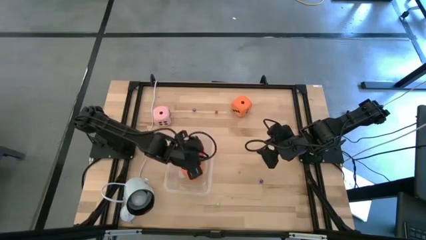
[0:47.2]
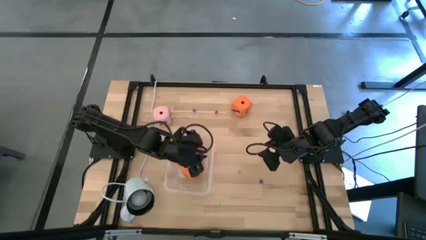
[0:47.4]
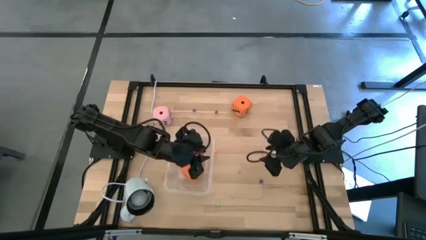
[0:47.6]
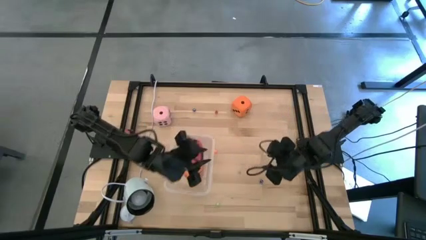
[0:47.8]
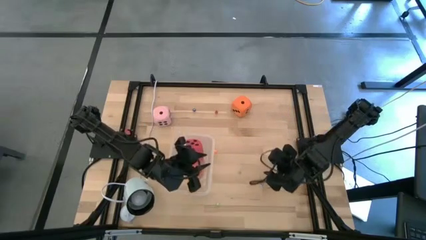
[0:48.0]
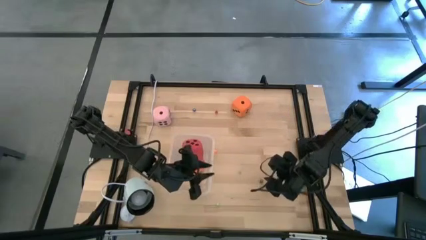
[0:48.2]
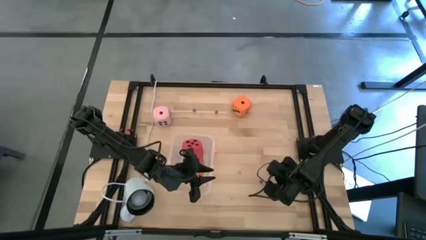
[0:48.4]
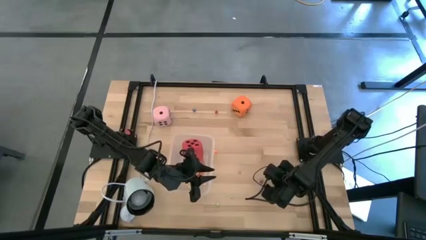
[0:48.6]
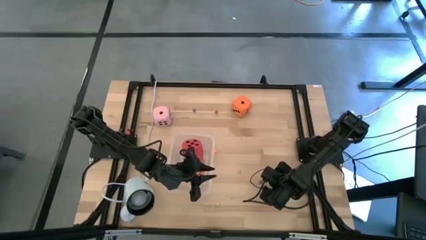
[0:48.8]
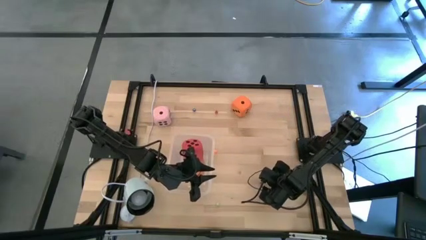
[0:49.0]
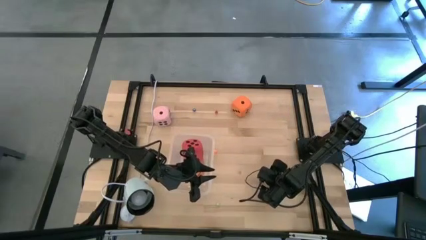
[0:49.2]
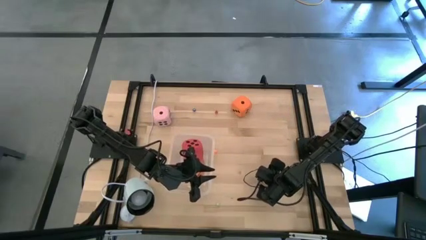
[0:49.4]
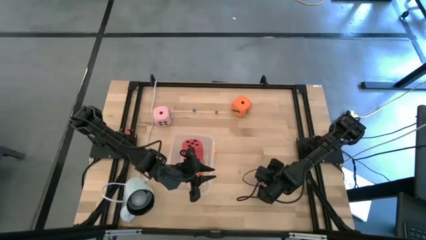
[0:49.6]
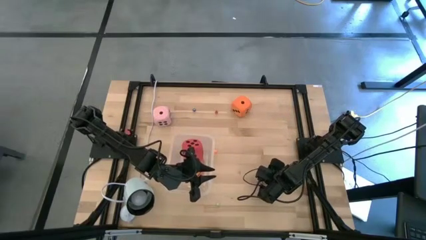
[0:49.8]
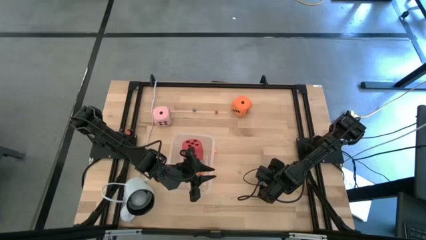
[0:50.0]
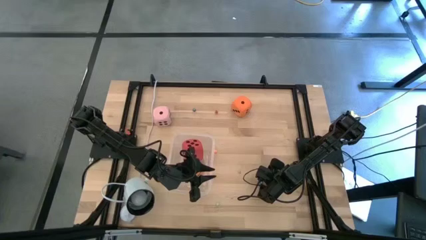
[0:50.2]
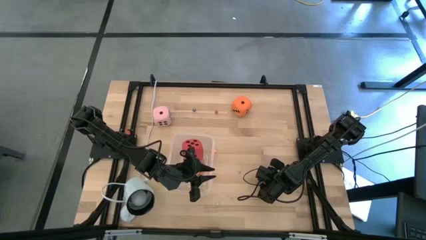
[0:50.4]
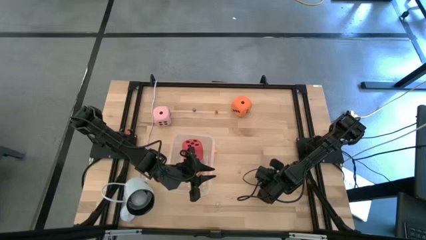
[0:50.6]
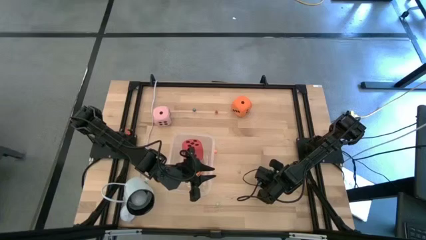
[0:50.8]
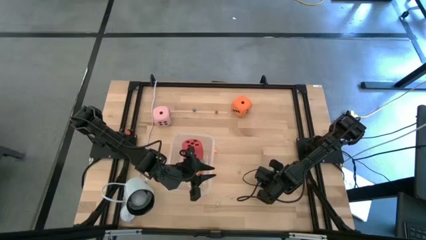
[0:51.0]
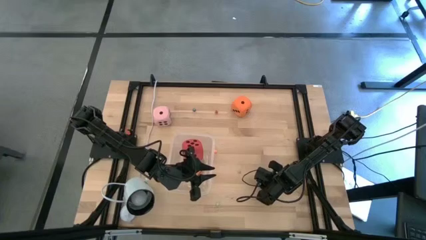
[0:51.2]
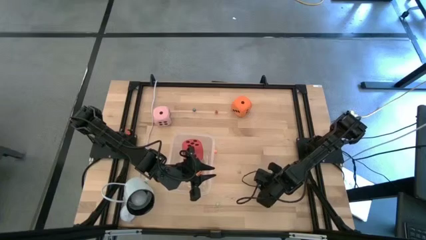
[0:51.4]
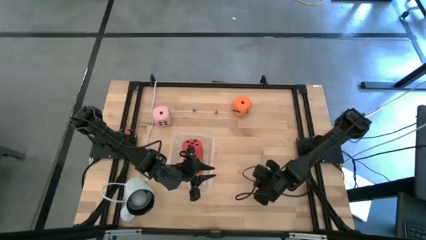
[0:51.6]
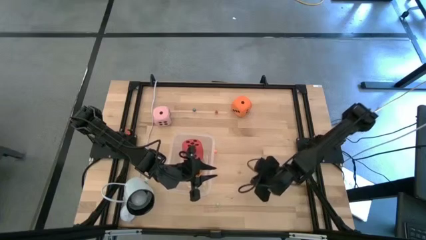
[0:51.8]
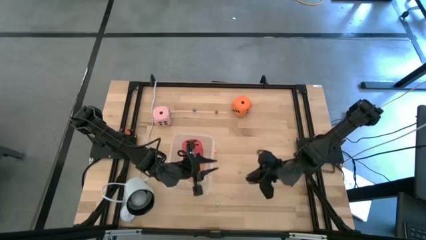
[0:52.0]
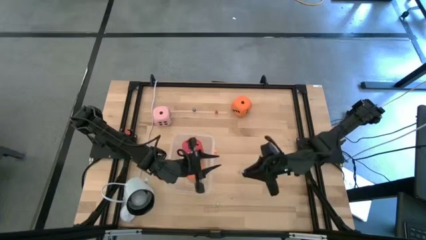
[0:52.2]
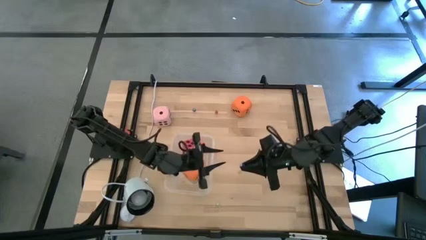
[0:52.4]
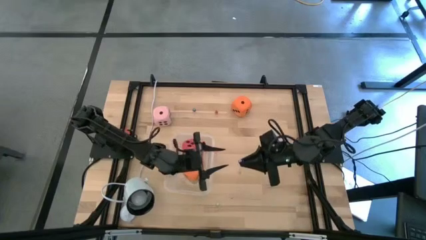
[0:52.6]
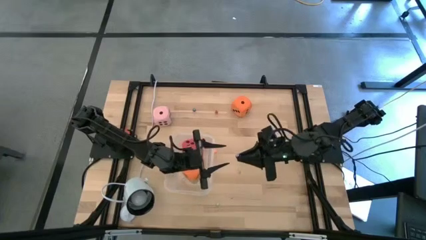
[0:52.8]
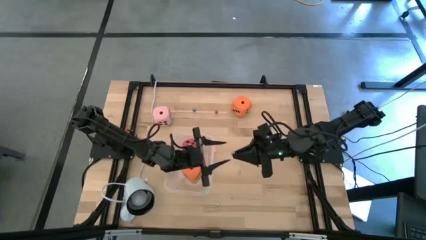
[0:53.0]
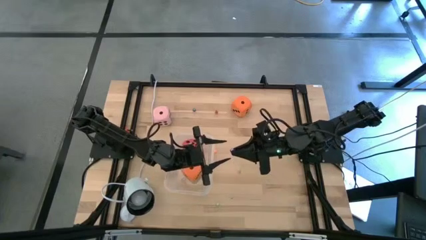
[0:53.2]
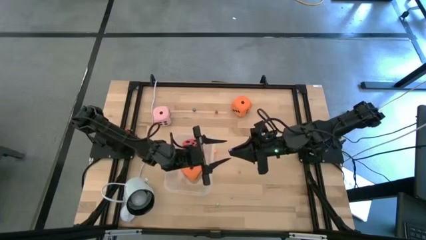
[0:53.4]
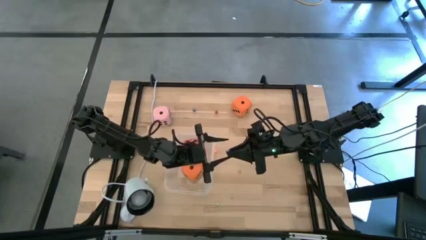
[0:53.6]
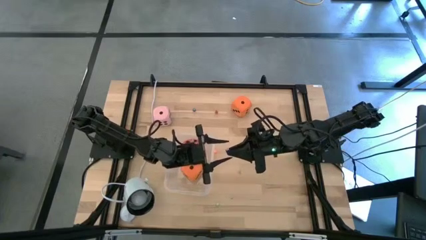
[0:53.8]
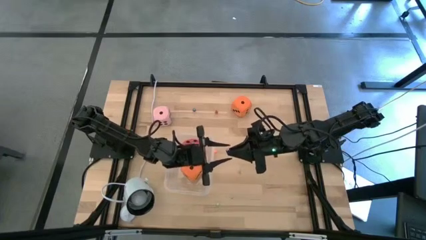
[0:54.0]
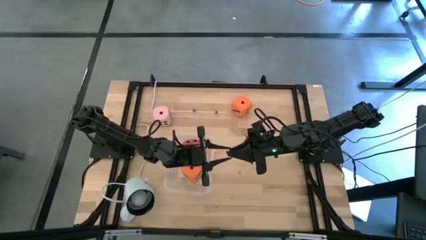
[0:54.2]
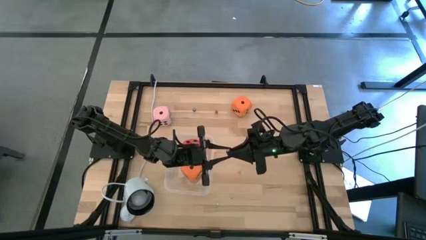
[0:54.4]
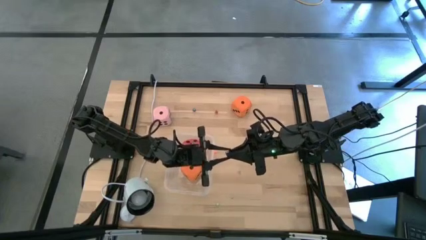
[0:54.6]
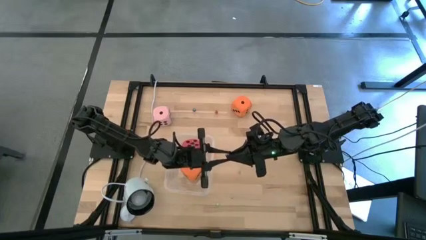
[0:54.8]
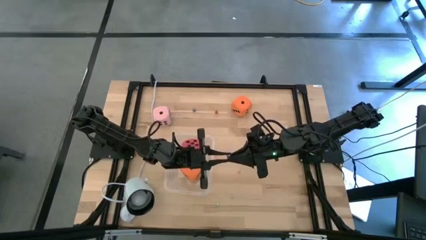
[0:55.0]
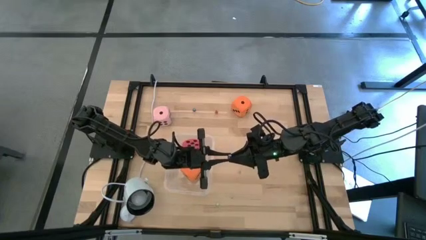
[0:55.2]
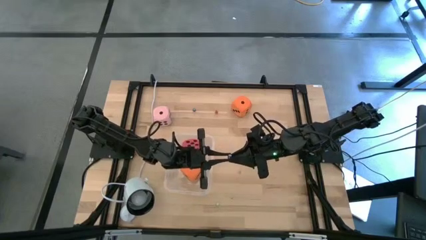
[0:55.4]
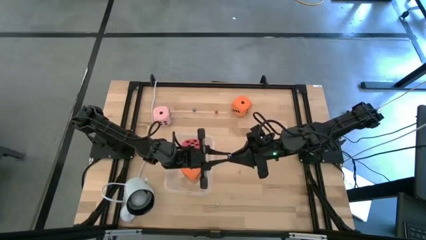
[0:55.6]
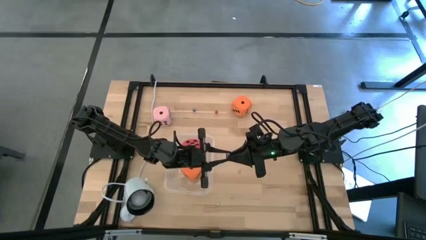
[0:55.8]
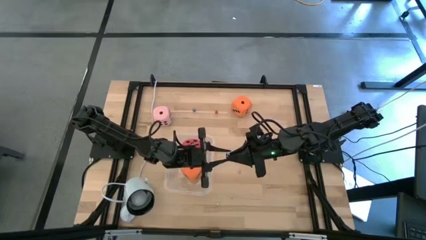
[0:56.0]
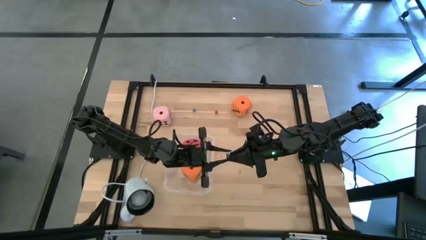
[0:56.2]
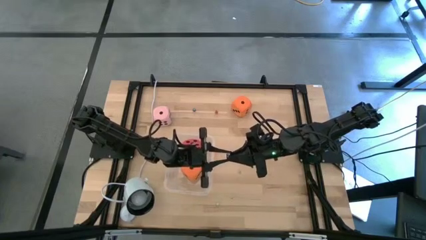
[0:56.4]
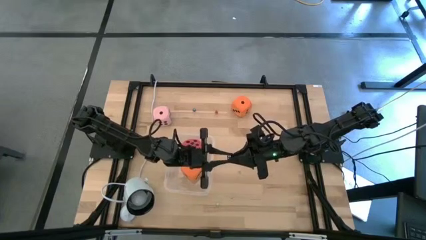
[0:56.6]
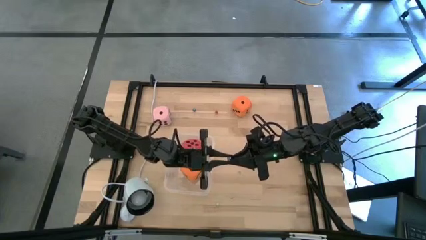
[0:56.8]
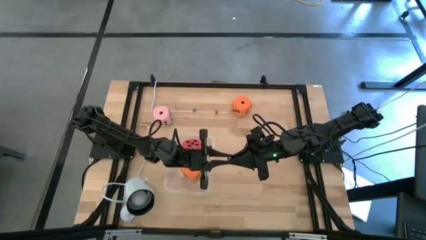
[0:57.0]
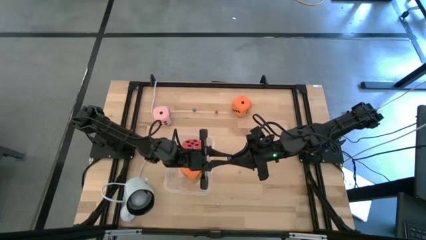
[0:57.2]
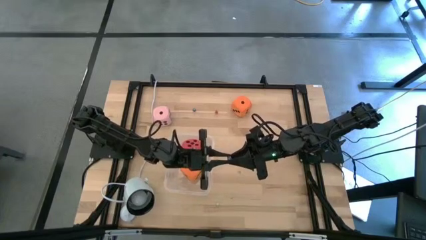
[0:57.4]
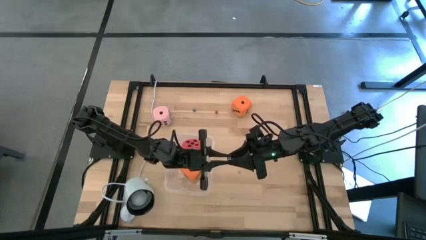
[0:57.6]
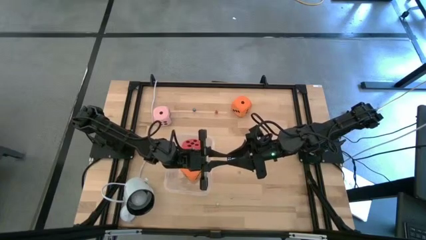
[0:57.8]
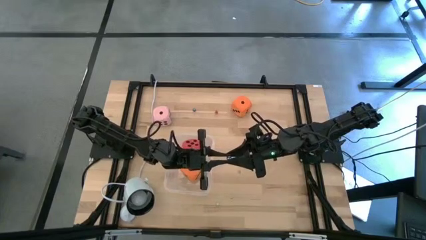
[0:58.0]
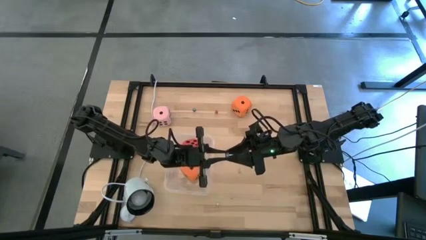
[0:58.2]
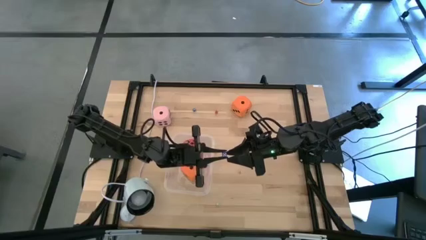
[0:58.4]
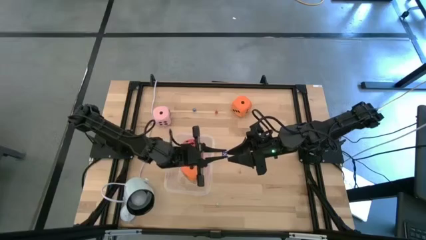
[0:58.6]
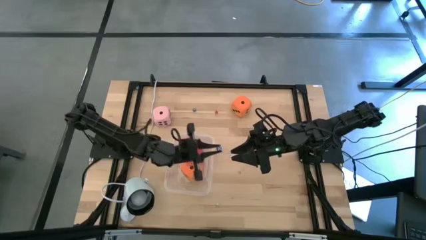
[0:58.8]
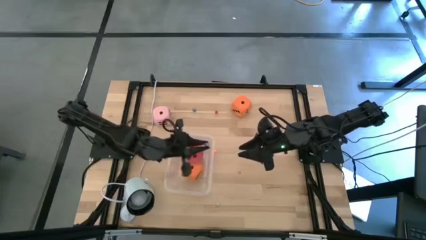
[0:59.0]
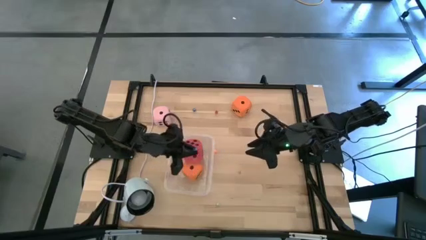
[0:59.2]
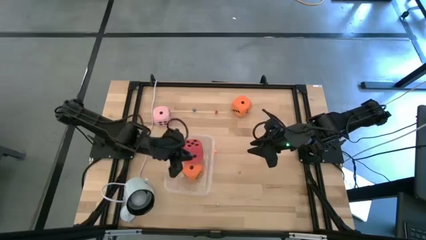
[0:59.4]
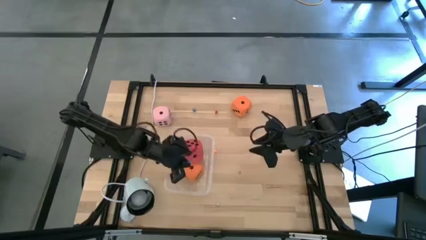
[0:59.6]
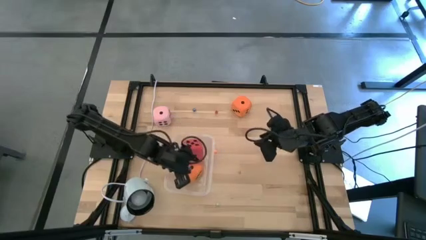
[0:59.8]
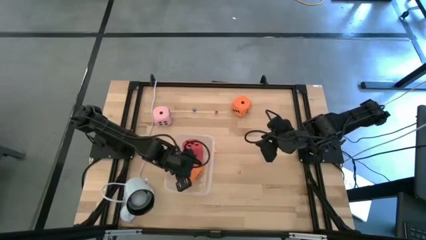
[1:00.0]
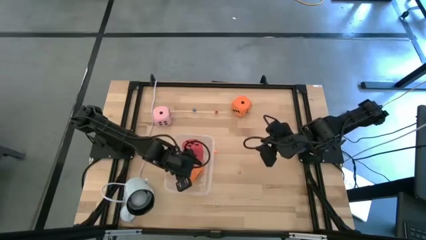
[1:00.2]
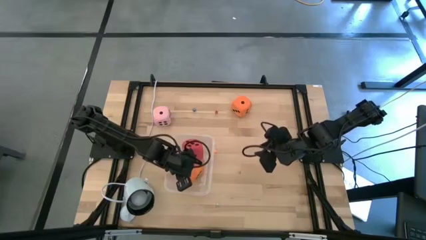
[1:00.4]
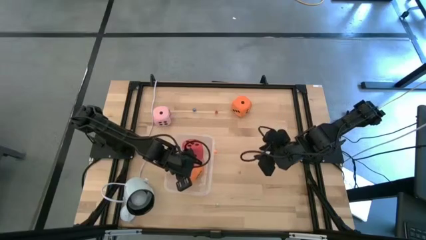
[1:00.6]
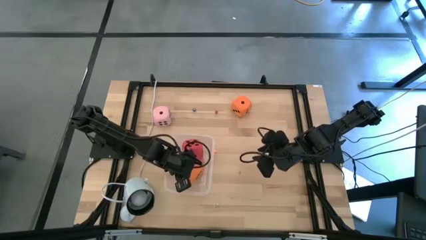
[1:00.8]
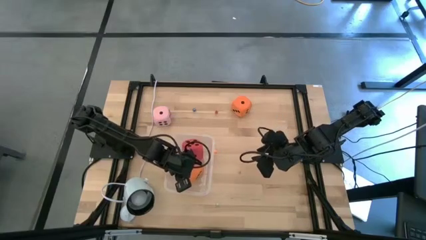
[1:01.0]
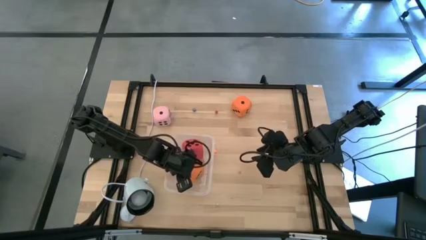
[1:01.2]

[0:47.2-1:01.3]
Task: Pick & Place Dice
Put the bottom small dark blue die on the bin
